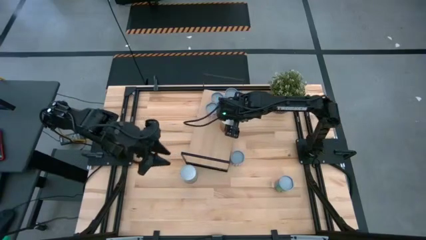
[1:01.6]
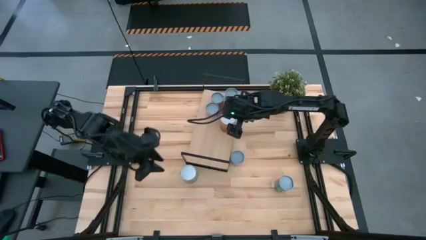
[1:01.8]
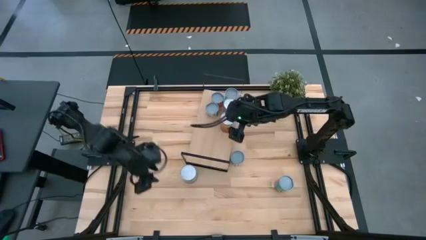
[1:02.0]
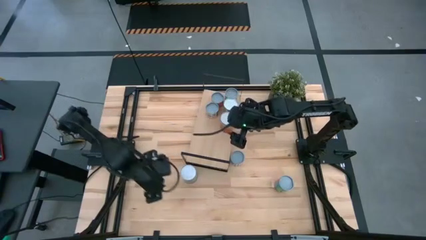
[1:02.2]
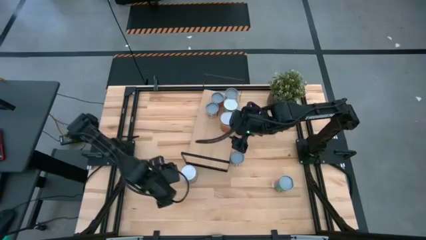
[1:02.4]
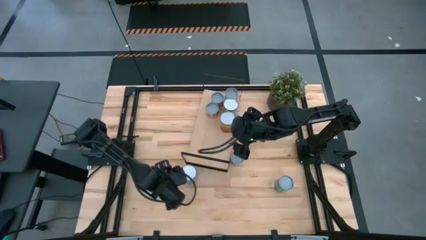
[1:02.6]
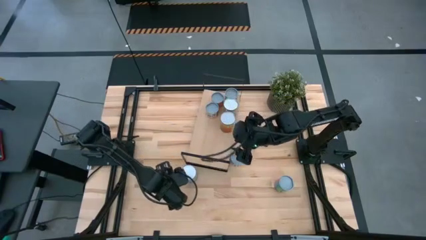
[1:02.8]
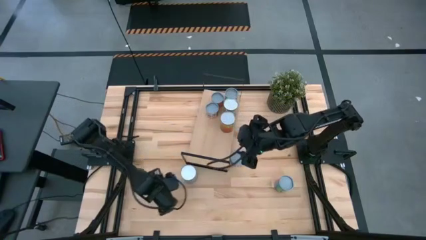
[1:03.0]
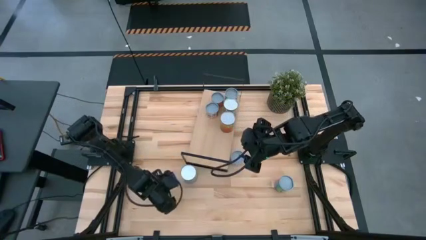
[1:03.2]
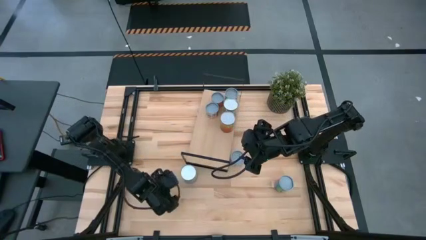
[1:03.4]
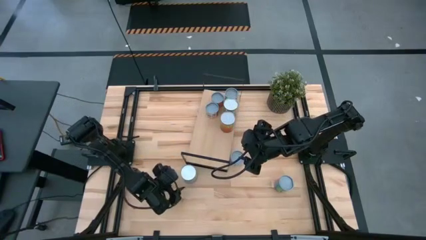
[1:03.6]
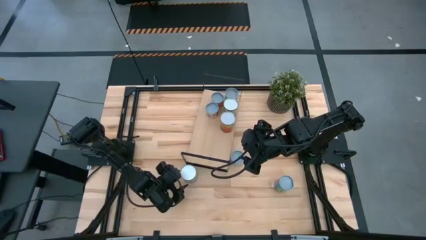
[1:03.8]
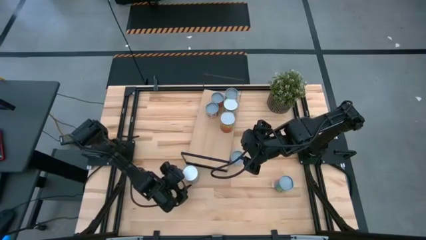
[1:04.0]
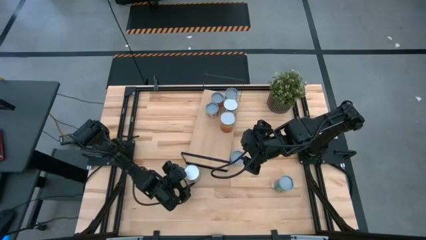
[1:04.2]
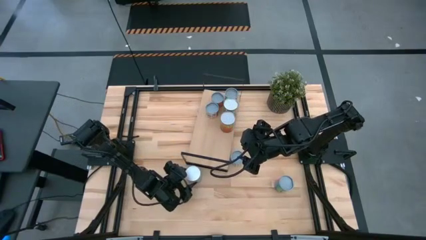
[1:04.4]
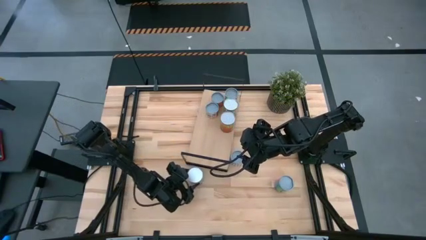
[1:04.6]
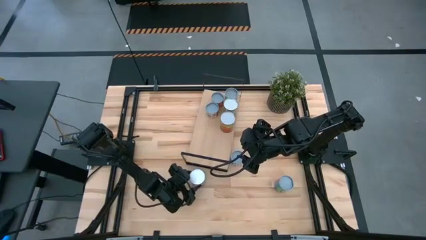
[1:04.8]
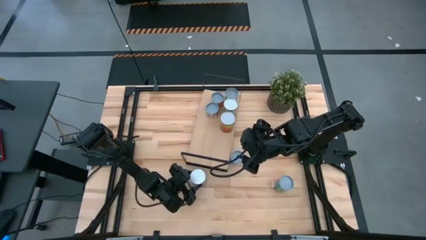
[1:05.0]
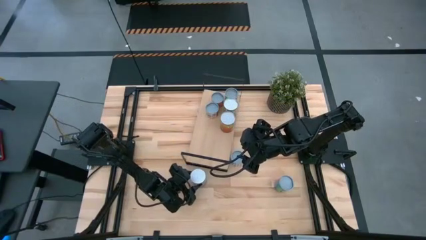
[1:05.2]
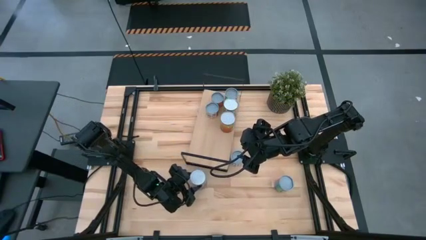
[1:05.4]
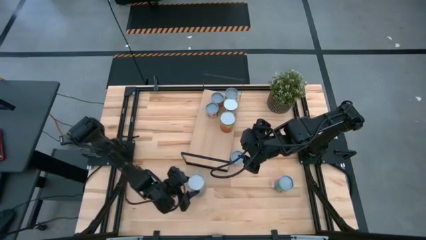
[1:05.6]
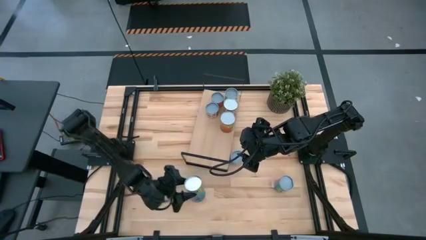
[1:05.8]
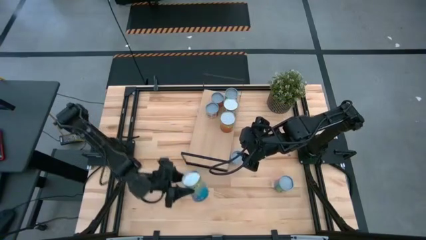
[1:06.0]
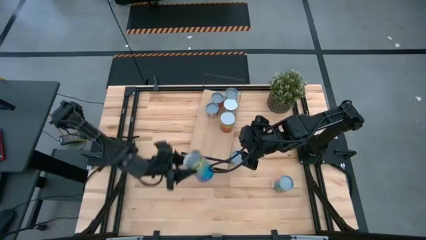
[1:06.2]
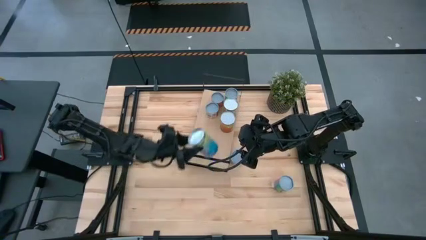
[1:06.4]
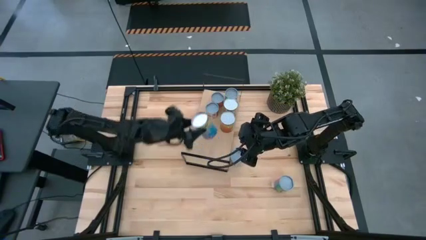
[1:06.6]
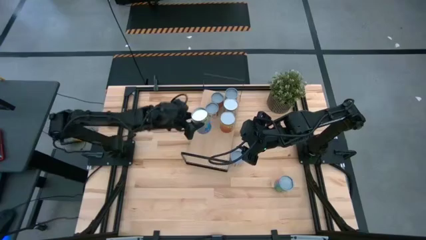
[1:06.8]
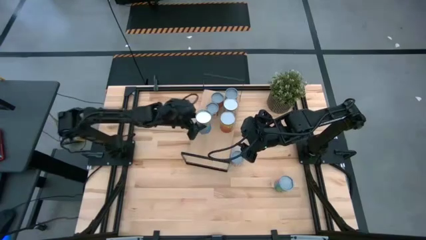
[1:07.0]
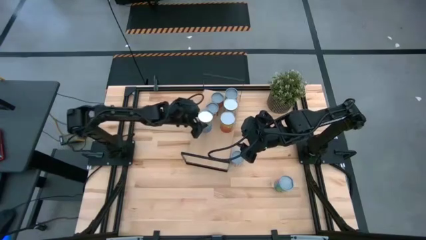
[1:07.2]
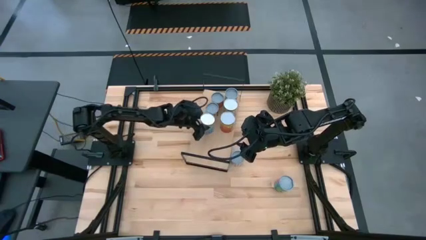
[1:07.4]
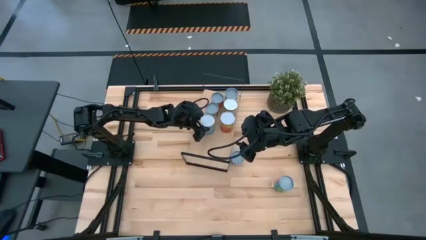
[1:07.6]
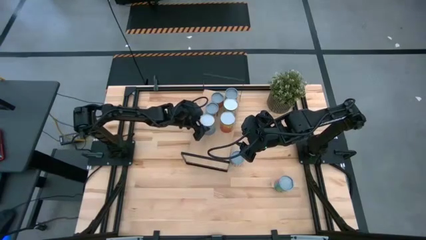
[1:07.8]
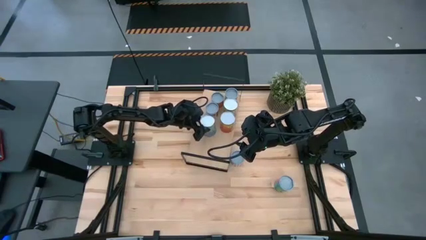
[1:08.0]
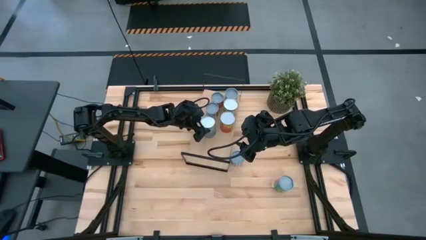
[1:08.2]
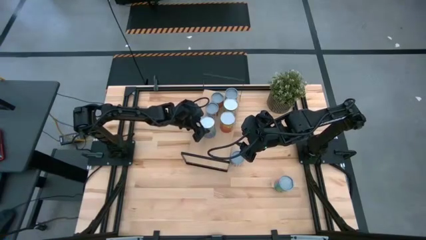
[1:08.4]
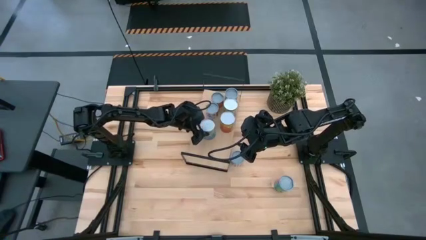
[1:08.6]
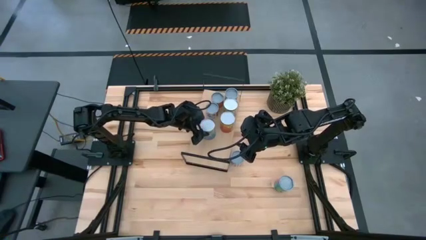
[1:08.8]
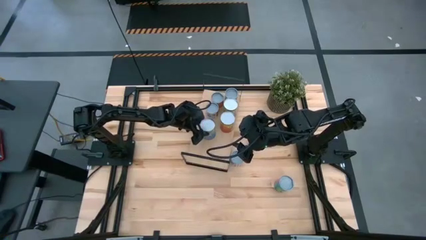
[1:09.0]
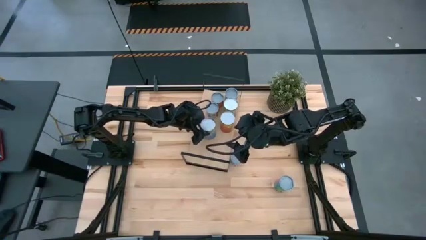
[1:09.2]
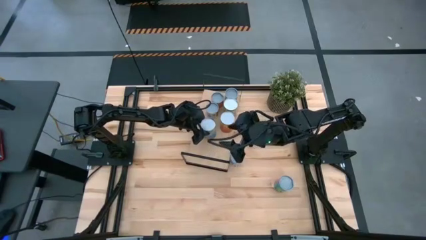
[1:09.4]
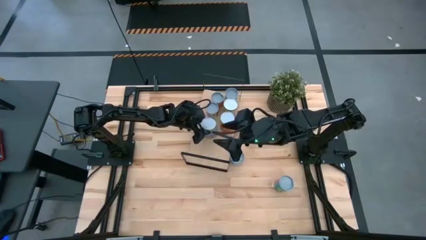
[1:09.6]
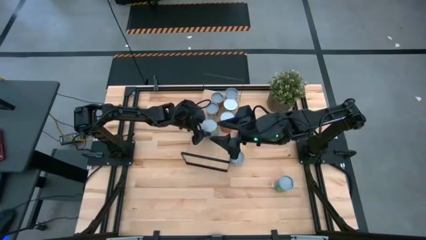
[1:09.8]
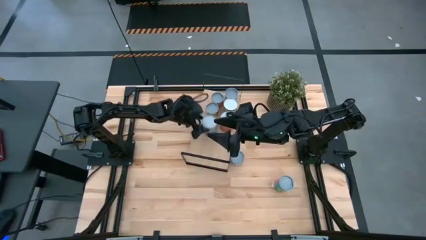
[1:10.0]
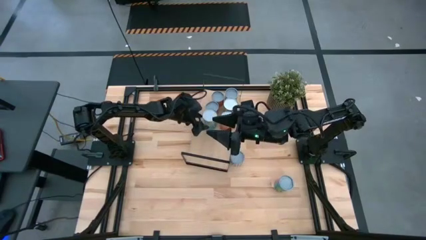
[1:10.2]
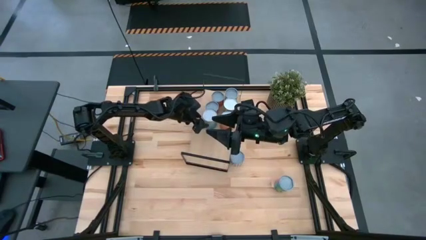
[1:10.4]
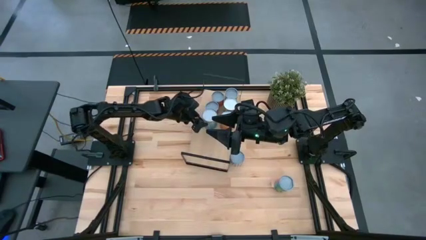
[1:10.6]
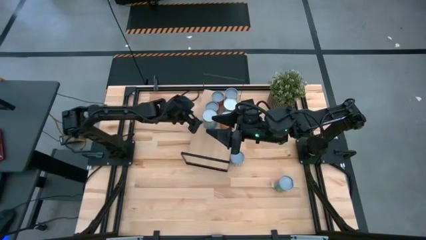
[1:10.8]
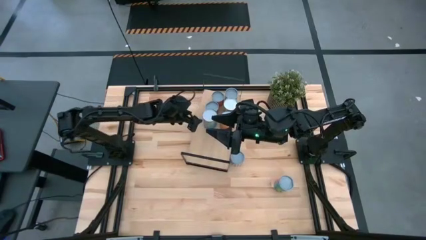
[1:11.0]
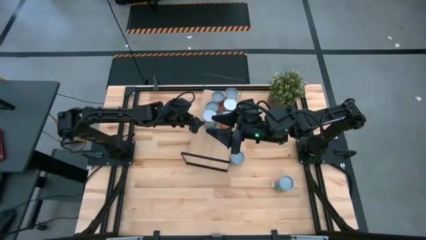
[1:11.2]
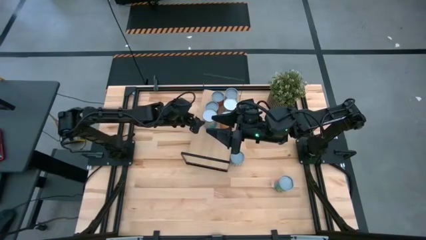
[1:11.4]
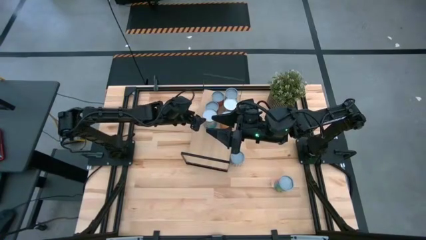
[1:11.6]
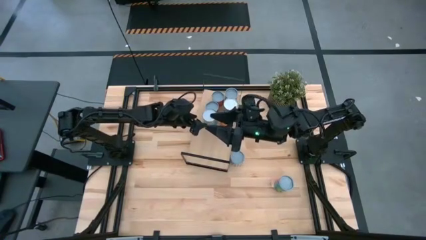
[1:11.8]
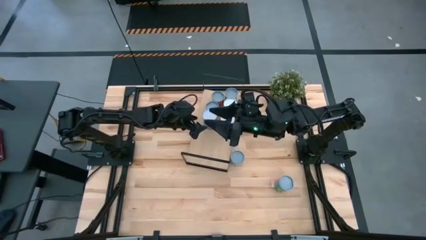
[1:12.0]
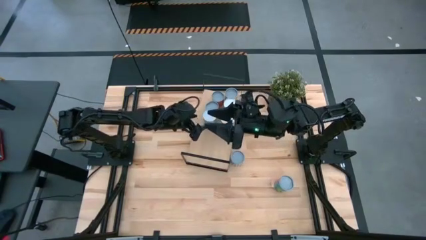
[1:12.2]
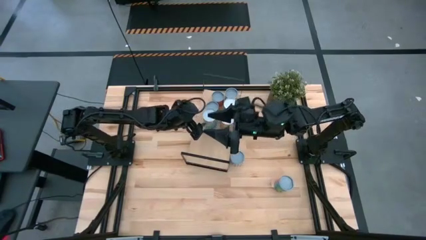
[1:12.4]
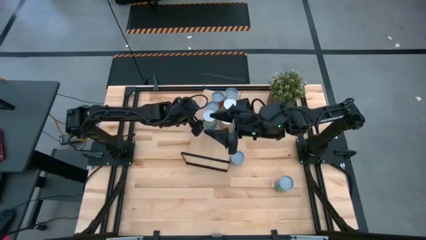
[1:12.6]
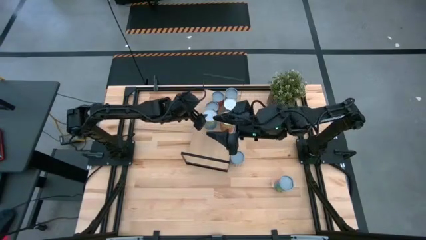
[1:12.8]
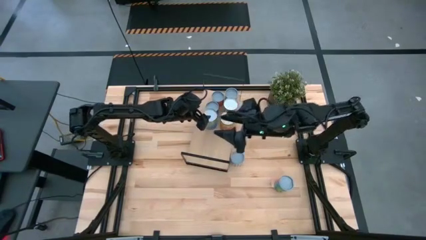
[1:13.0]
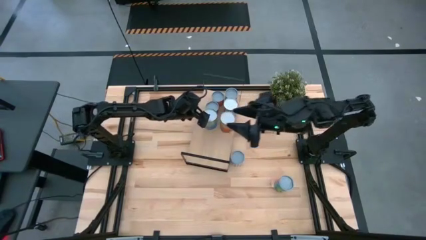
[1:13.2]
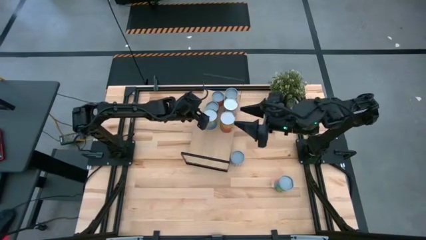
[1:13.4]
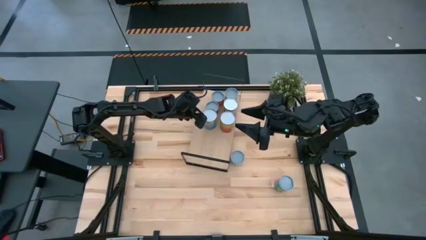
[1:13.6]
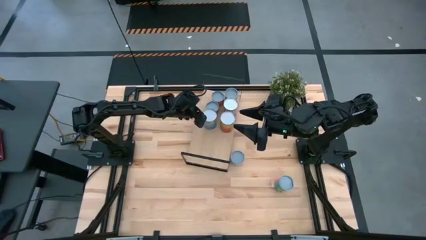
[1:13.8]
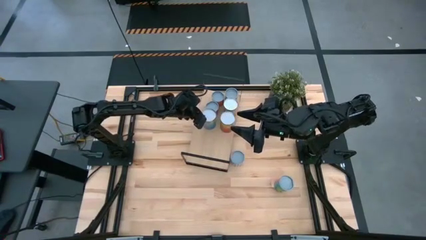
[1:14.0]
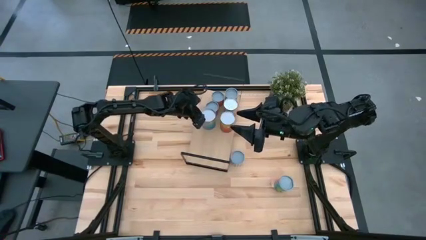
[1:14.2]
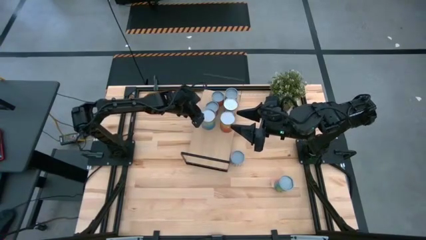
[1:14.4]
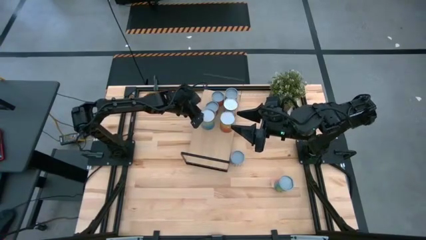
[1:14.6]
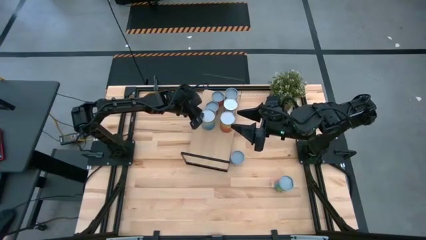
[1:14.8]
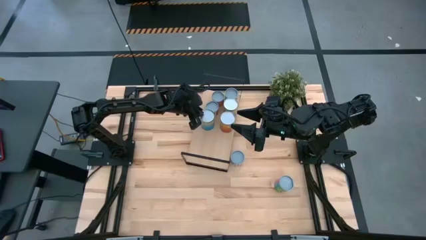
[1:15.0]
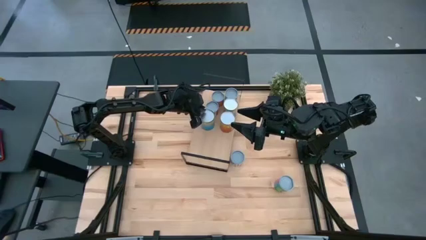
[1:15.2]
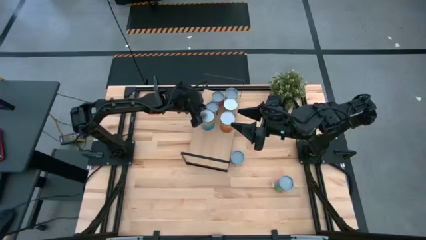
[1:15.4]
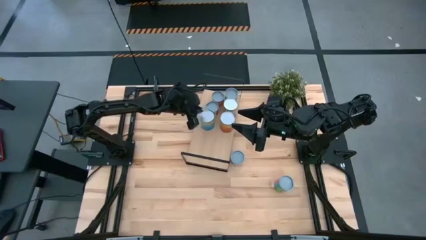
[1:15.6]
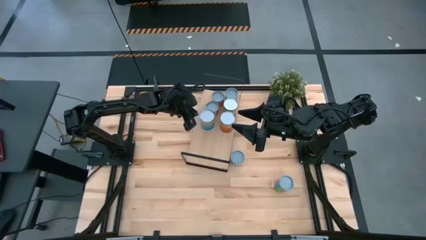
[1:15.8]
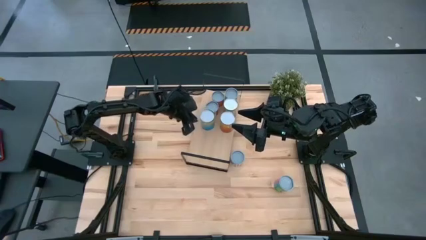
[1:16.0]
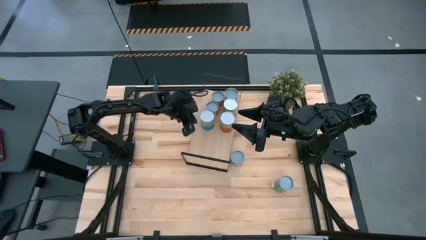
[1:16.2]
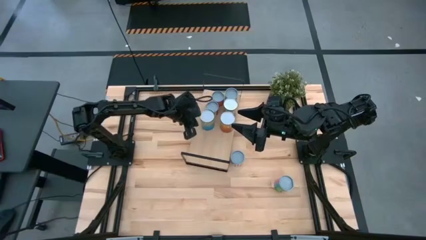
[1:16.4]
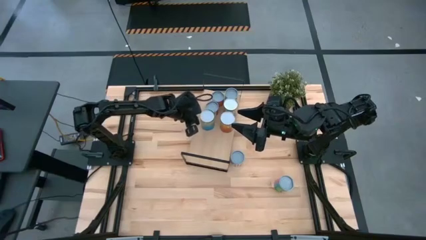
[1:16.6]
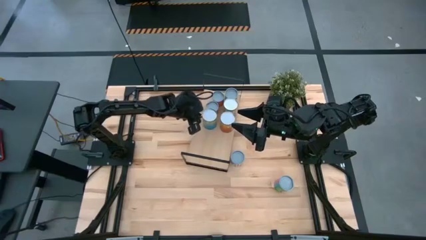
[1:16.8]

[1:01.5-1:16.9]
Task: Pick and place cans onto a shelf
Put the blue can on the shelf aligned with the orange can
